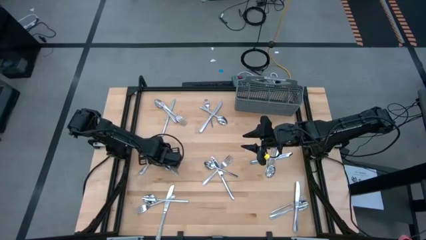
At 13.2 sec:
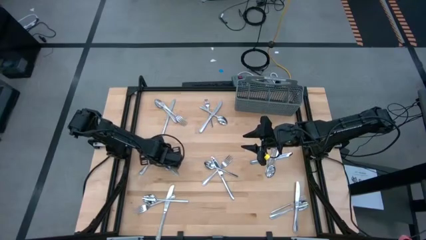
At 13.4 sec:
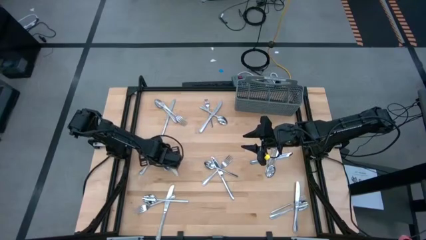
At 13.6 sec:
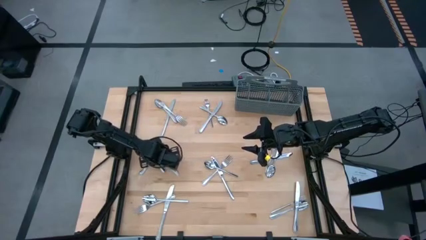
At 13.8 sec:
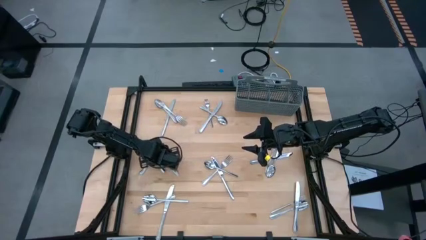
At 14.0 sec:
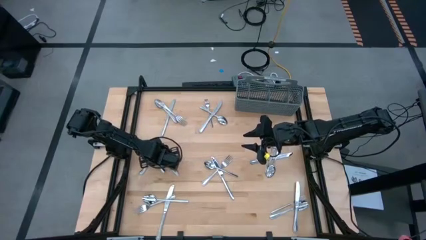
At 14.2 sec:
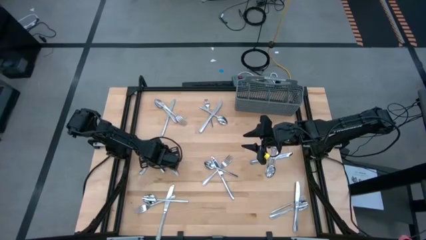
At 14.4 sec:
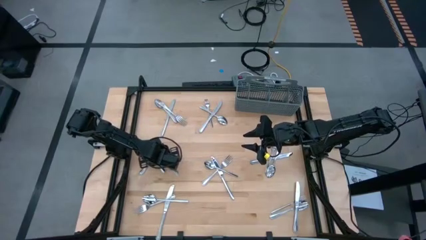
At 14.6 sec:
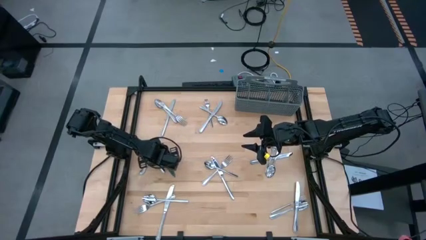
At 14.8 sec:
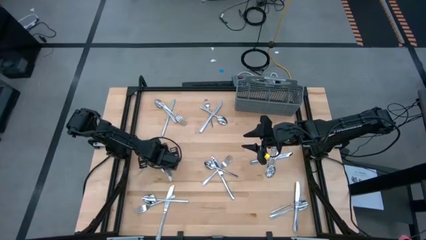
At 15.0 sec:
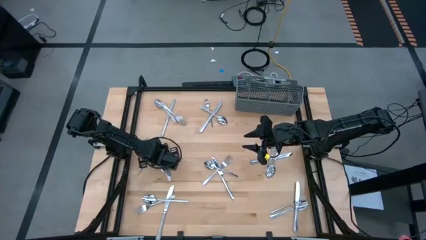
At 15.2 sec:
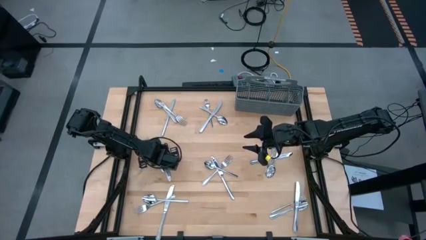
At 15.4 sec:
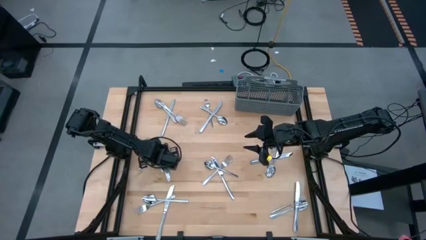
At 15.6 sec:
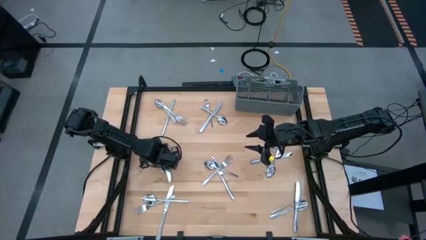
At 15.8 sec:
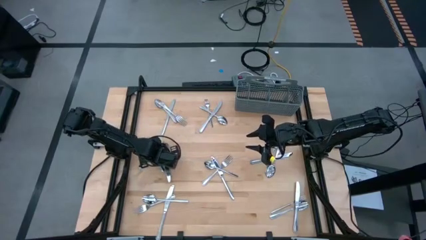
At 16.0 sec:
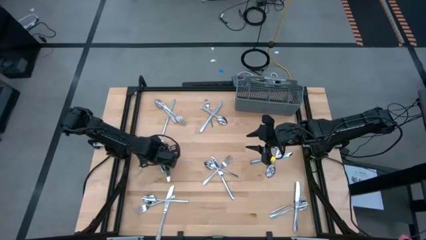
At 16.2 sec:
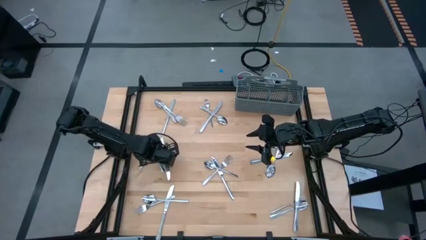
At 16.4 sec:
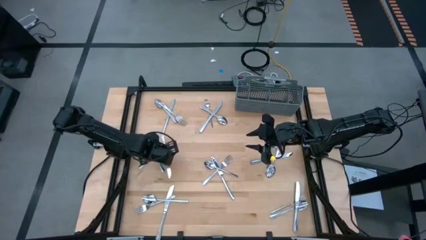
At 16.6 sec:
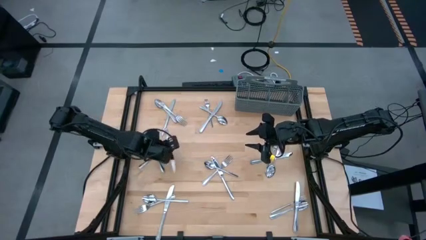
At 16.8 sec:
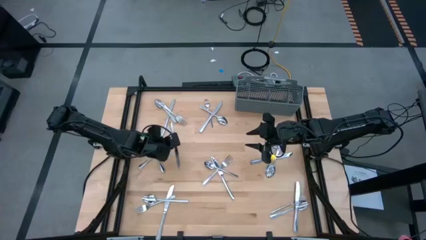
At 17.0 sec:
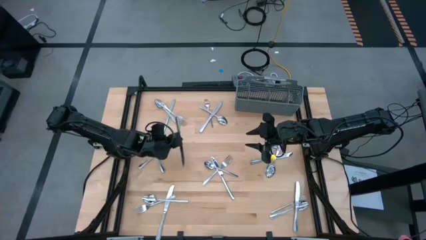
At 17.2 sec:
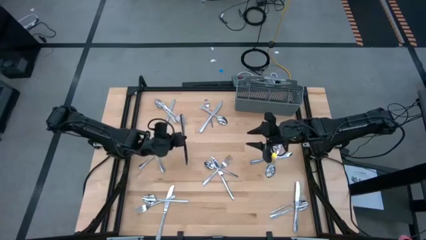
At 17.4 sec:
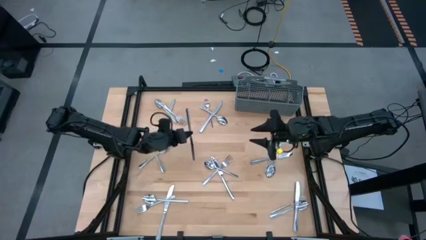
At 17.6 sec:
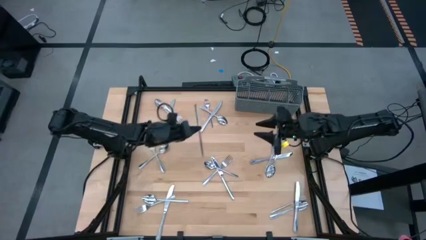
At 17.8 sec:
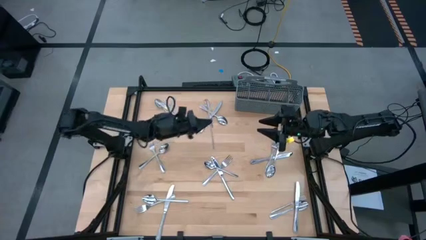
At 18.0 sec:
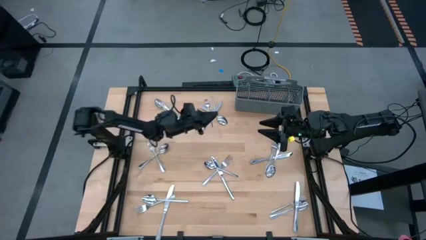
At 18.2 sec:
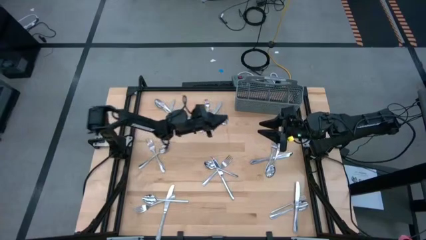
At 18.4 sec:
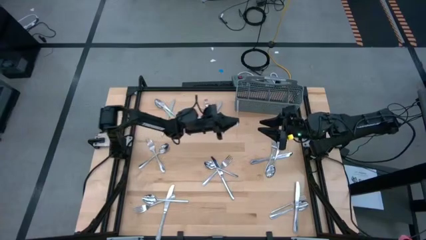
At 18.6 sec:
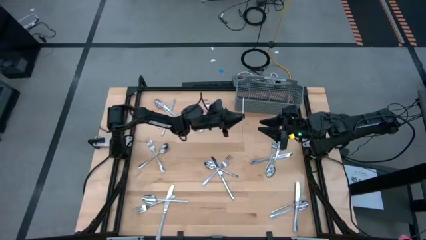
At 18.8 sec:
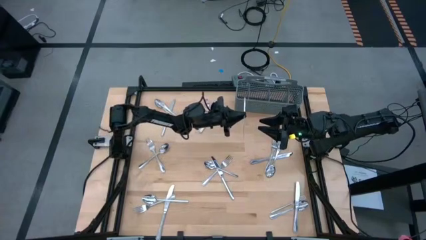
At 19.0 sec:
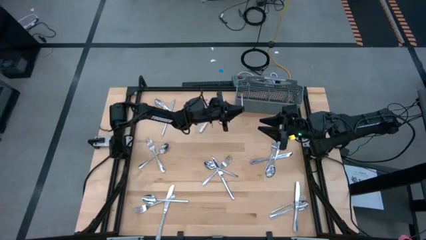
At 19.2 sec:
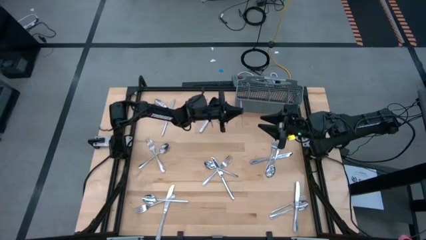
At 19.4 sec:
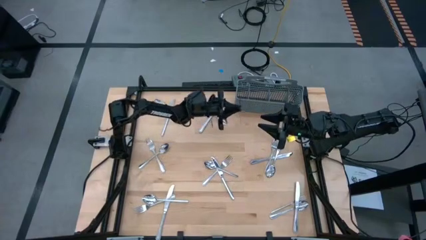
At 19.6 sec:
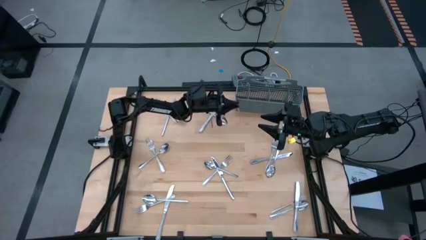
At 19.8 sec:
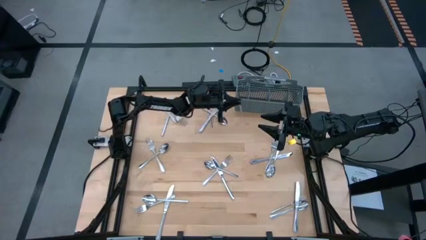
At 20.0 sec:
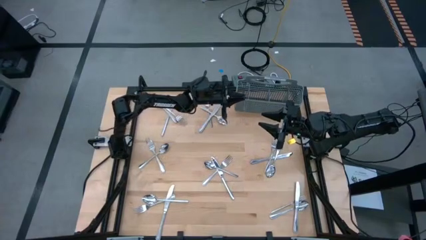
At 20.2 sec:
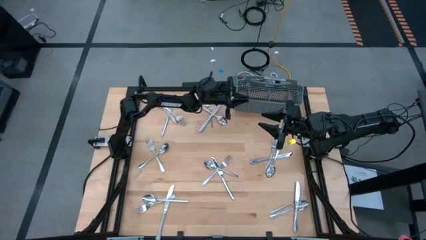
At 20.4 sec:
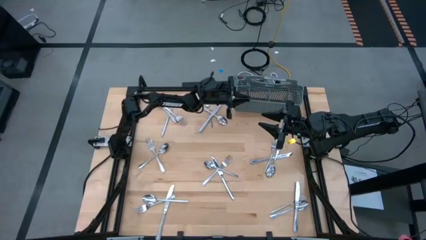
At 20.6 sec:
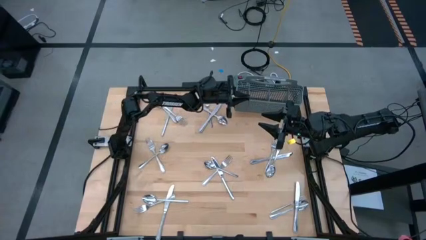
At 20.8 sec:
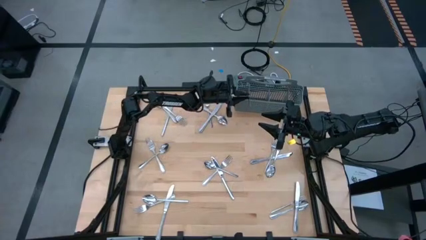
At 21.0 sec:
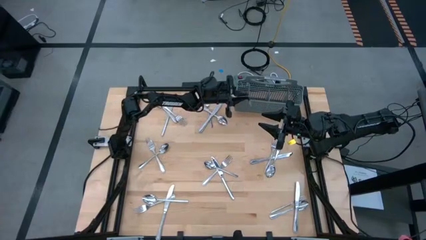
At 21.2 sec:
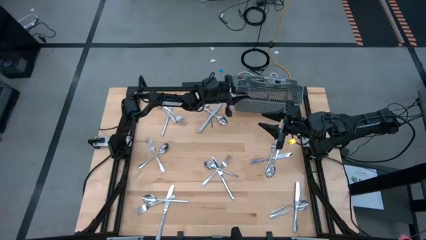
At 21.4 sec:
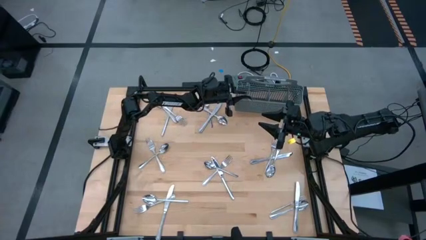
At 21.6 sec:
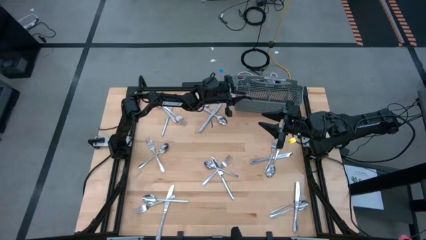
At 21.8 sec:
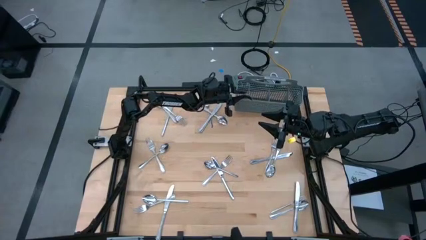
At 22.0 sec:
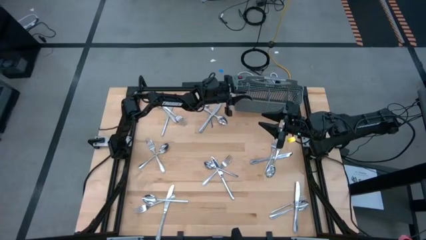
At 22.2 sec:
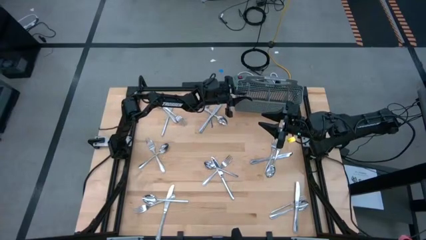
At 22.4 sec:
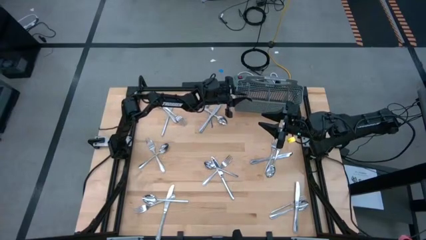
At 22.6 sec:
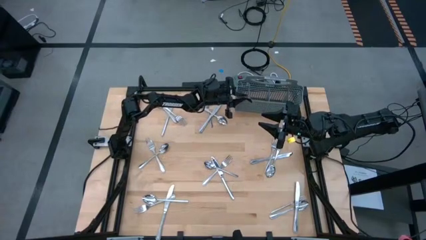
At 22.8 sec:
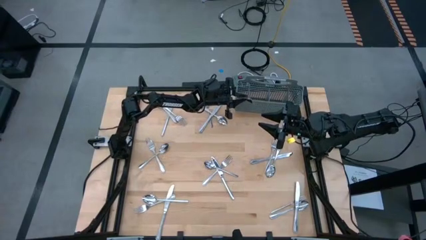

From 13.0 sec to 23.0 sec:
Task: Sort silverware
Put the silver knife into the silverware basket

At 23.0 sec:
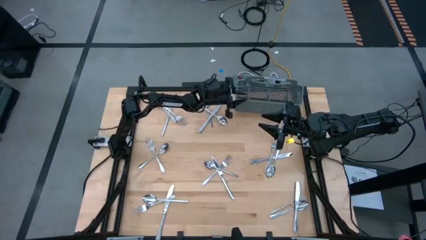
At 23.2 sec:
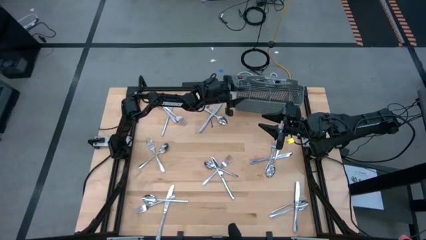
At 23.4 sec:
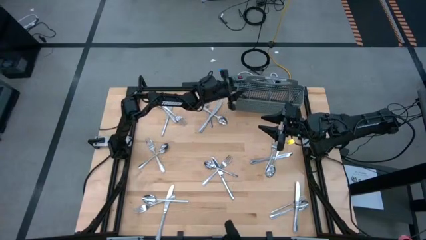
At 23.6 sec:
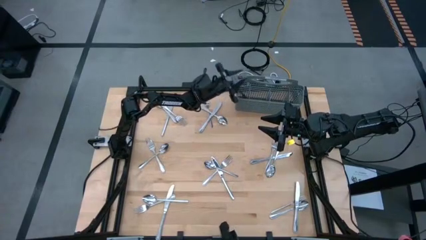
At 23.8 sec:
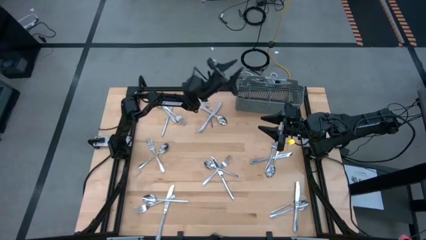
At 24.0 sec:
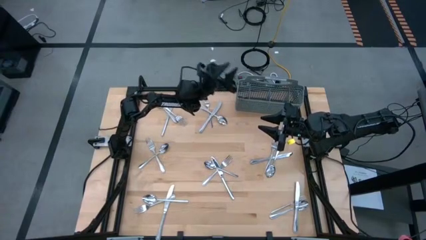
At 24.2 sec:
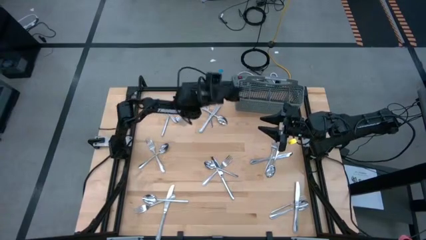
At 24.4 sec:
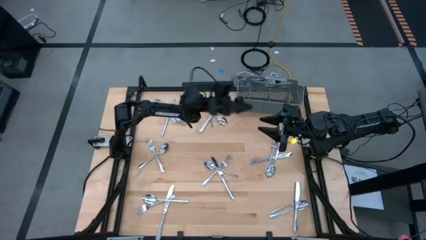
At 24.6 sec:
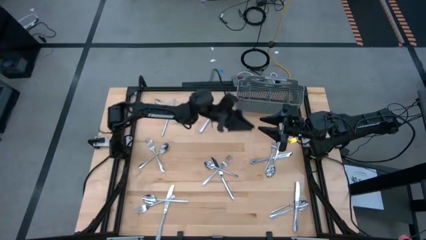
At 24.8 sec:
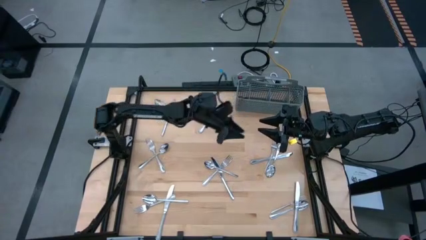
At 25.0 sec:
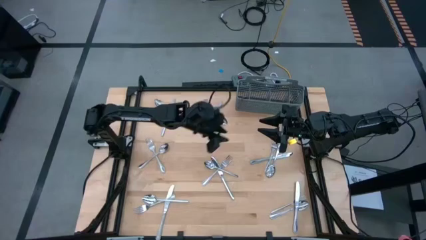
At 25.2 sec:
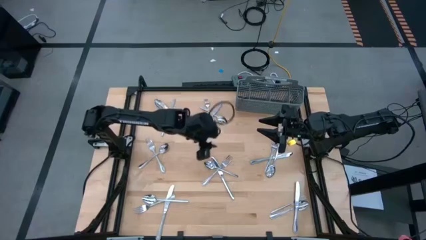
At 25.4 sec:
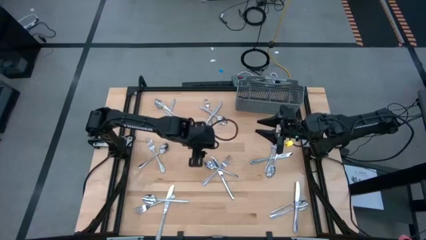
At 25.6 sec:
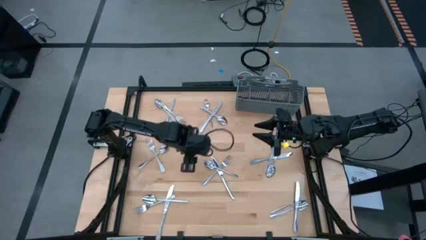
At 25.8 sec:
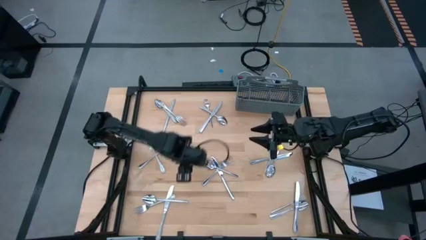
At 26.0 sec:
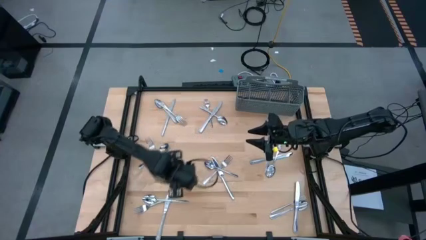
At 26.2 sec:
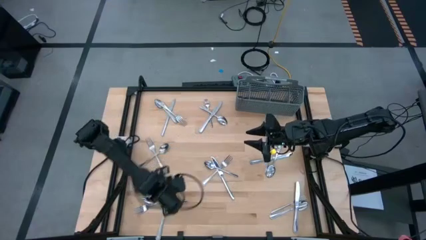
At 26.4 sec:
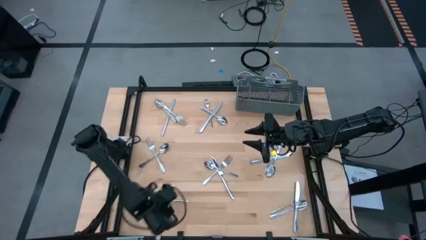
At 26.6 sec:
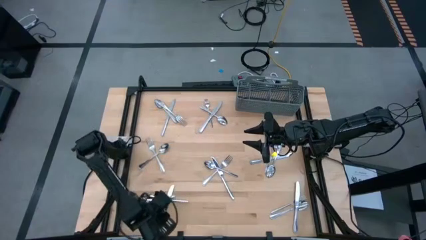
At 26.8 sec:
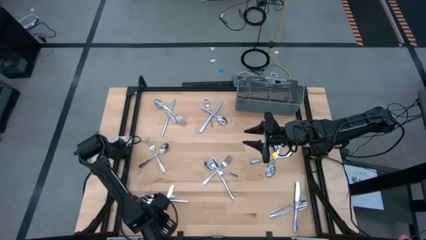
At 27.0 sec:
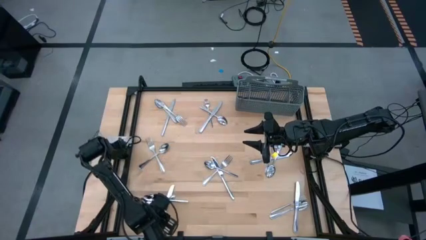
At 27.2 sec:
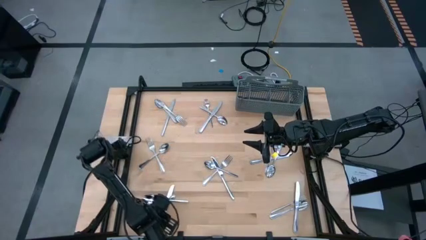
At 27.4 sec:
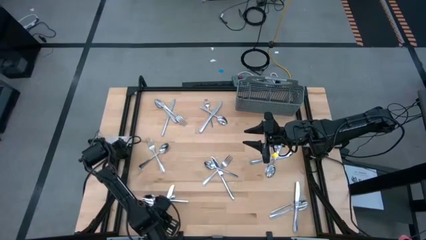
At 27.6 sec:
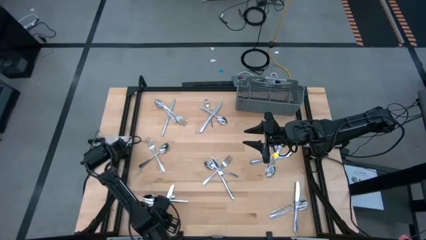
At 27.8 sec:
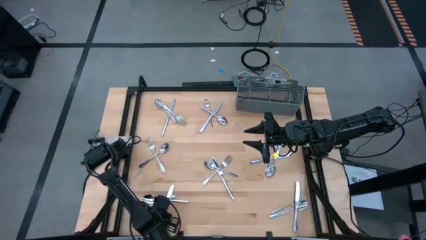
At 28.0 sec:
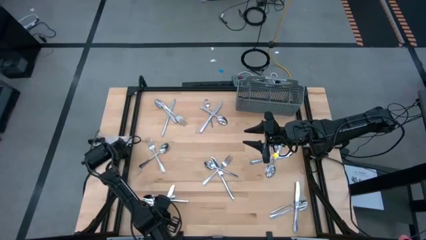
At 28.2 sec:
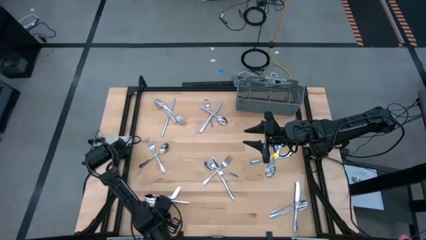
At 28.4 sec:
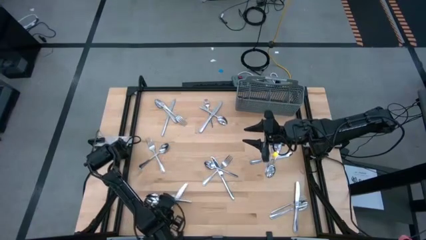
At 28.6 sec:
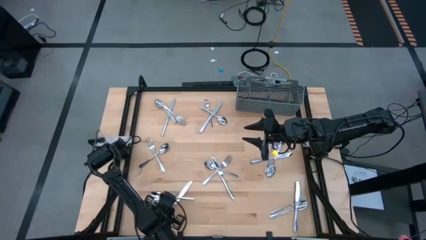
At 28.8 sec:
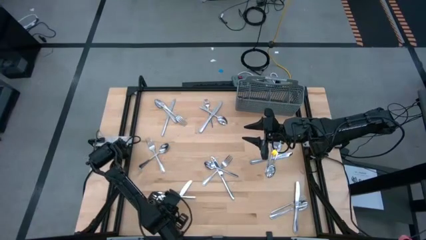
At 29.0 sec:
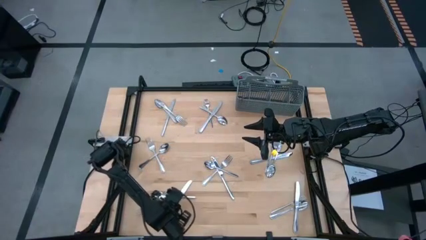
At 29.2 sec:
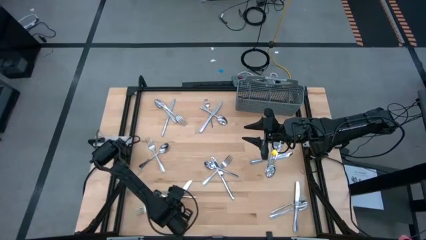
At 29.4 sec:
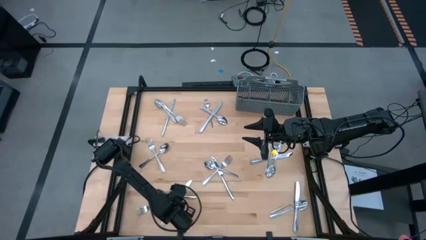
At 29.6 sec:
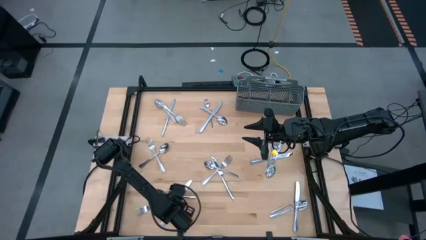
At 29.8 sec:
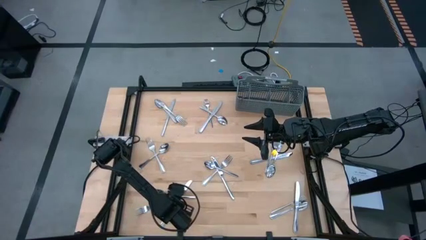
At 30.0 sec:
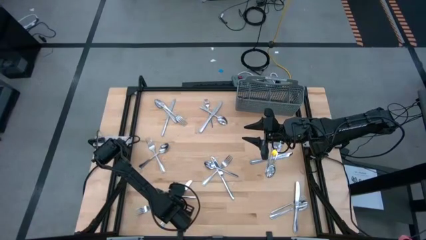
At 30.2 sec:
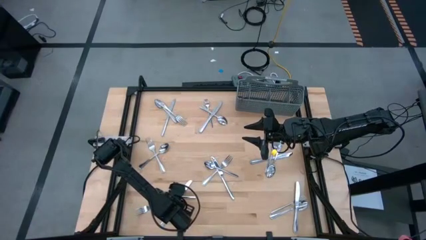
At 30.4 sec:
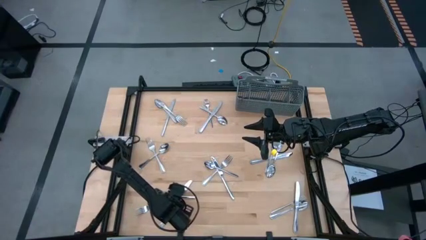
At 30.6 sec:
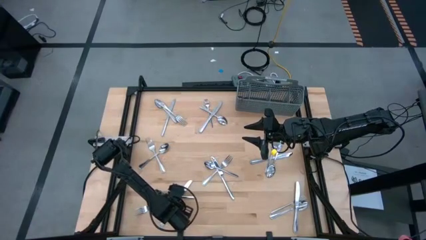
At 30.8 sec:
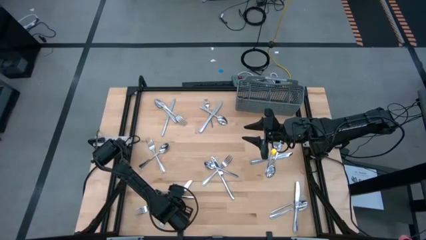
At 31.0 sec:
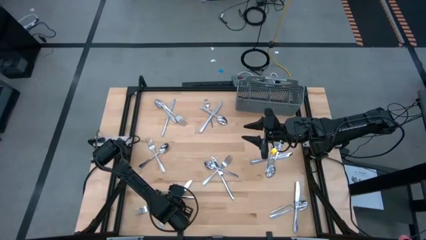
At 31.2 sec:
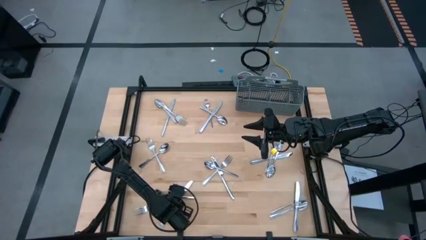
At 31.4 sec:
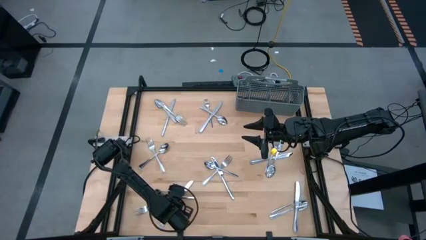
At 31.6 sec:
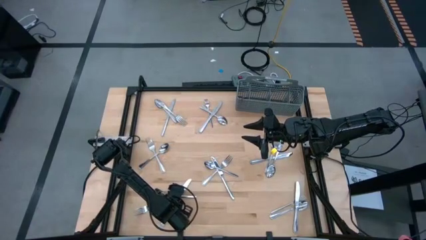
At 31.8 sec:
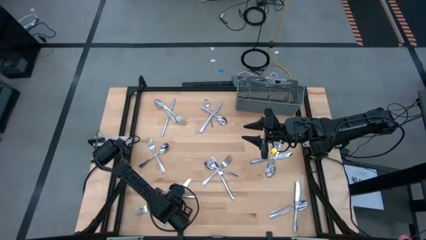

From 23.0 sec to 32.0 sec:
Put the silver knife into the silverware basket
